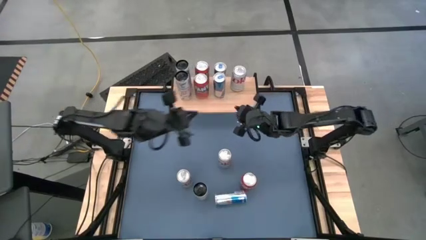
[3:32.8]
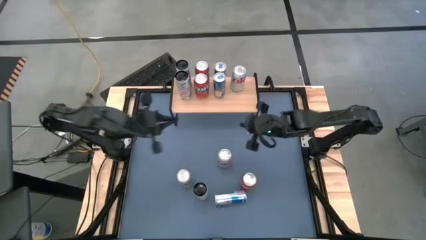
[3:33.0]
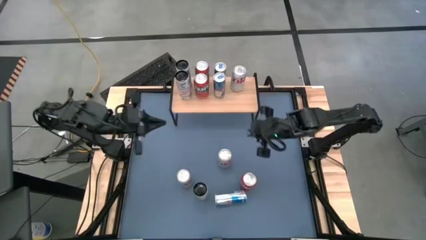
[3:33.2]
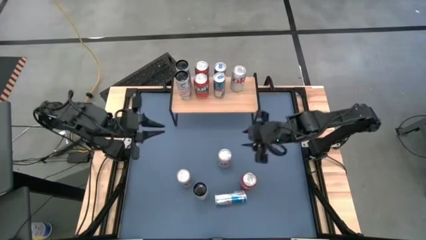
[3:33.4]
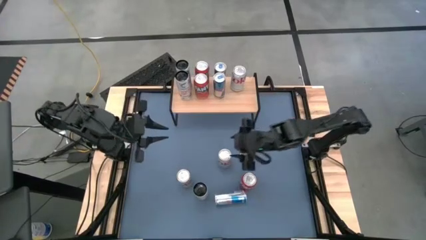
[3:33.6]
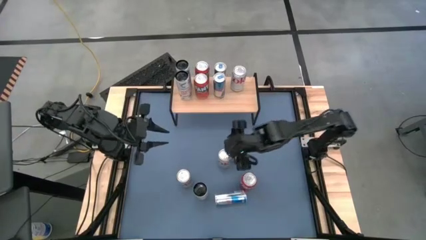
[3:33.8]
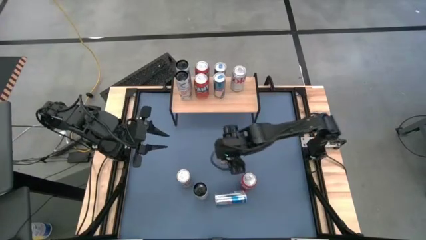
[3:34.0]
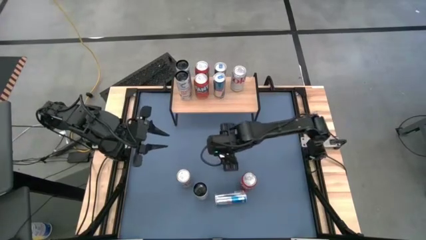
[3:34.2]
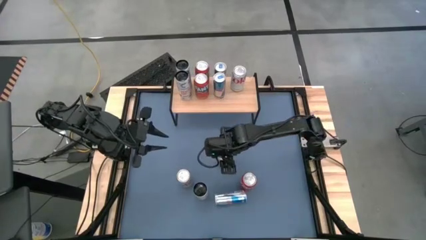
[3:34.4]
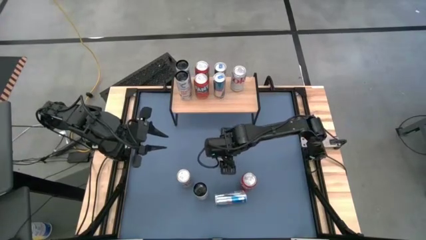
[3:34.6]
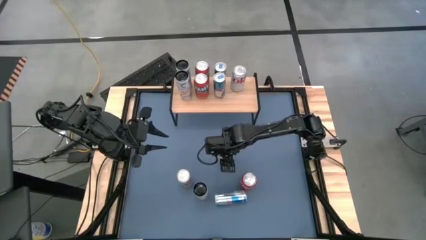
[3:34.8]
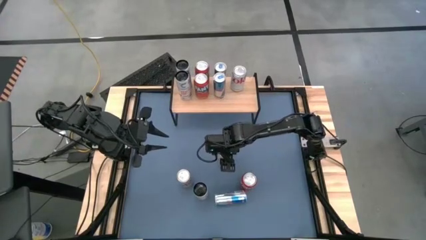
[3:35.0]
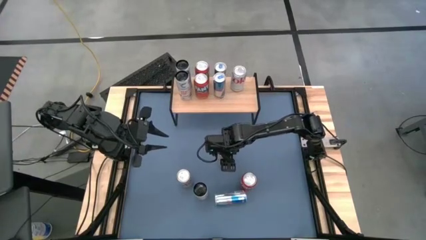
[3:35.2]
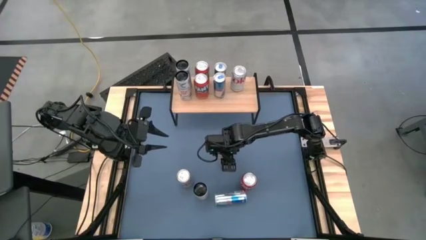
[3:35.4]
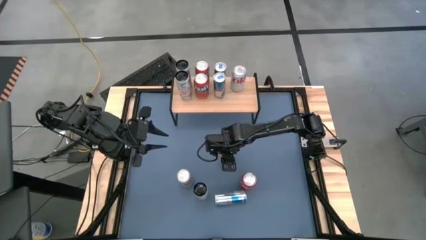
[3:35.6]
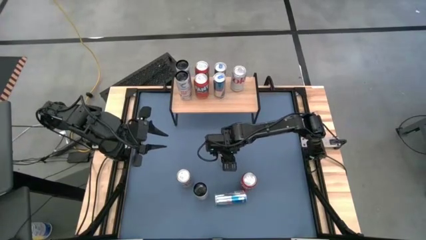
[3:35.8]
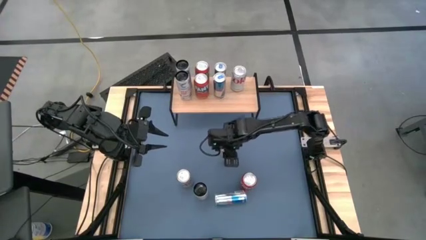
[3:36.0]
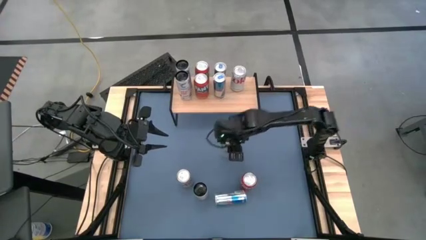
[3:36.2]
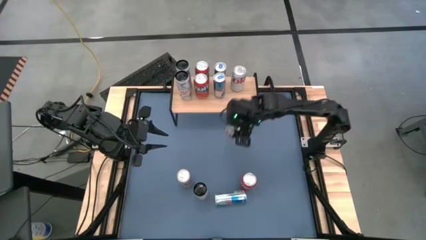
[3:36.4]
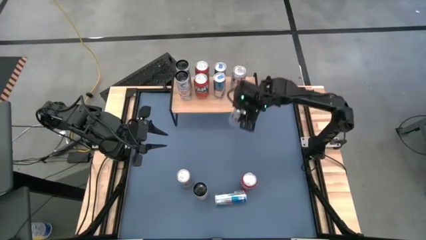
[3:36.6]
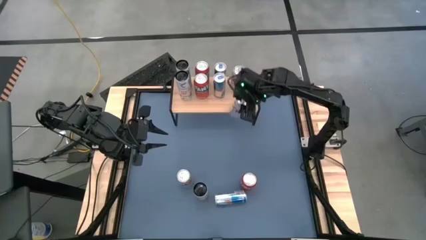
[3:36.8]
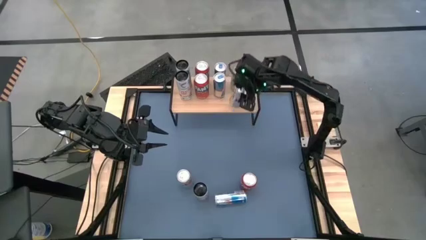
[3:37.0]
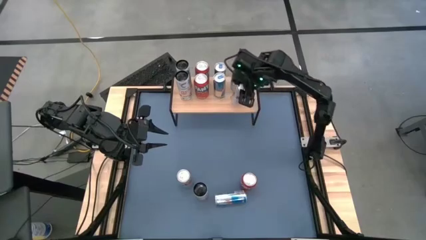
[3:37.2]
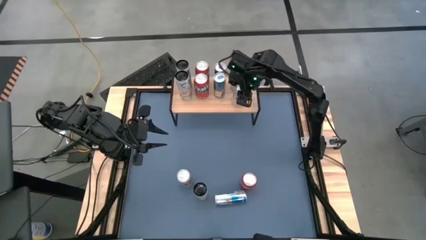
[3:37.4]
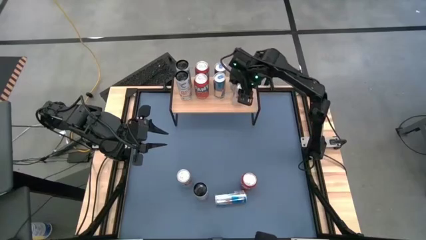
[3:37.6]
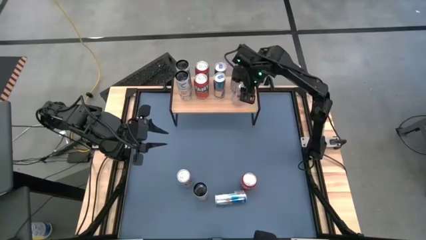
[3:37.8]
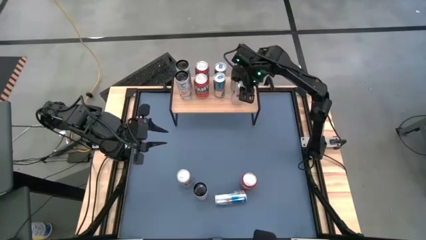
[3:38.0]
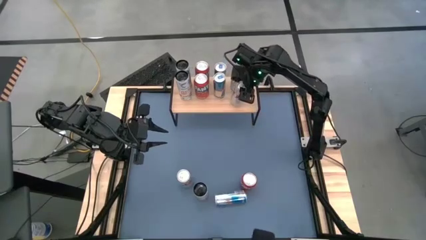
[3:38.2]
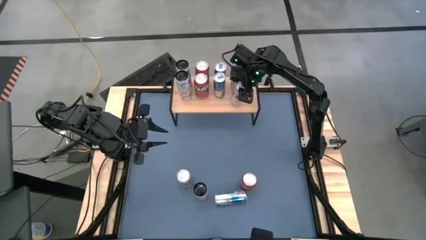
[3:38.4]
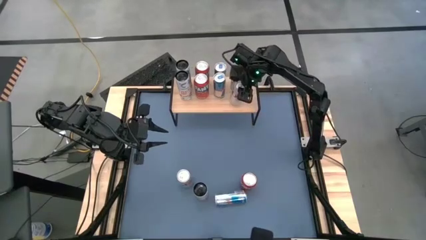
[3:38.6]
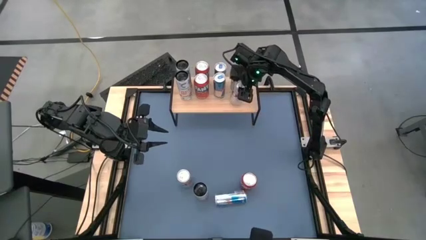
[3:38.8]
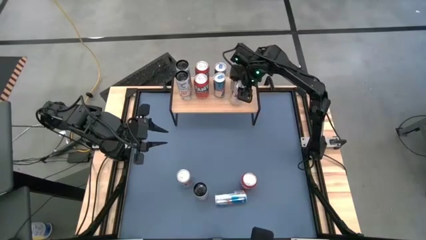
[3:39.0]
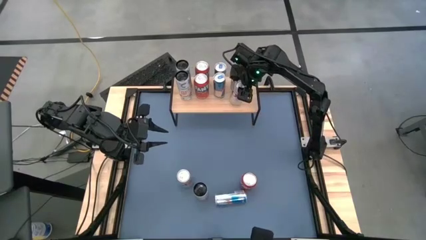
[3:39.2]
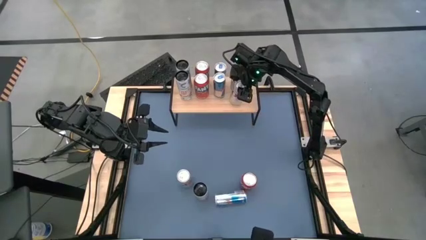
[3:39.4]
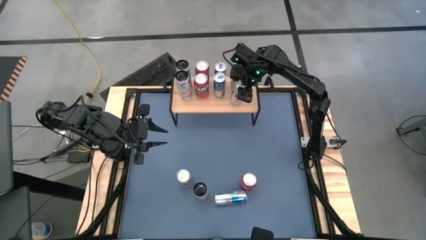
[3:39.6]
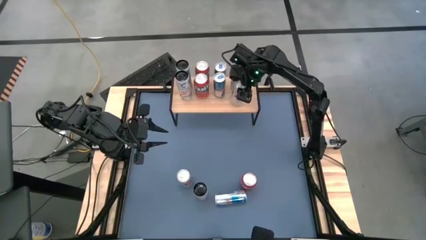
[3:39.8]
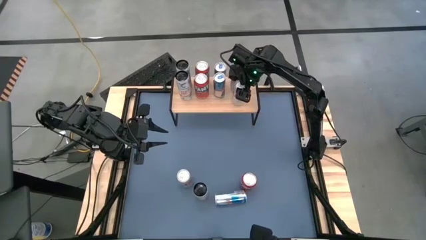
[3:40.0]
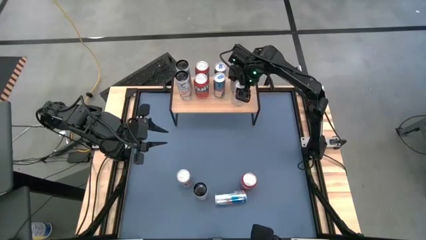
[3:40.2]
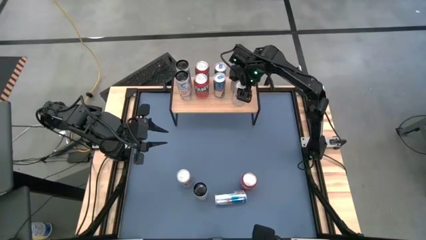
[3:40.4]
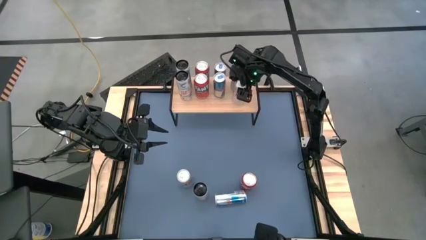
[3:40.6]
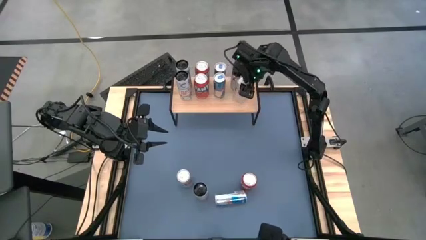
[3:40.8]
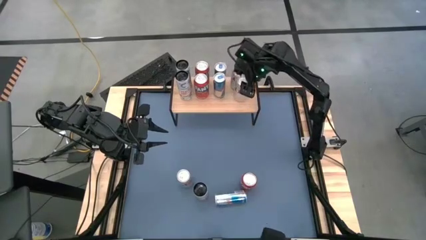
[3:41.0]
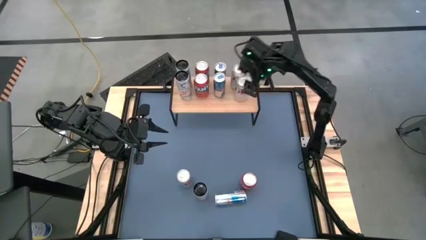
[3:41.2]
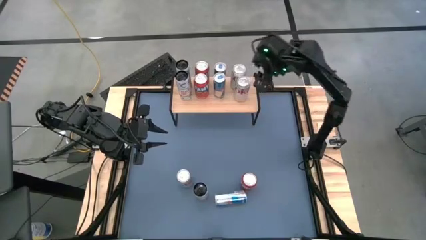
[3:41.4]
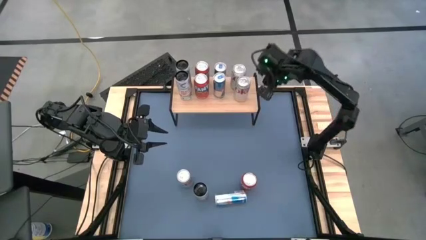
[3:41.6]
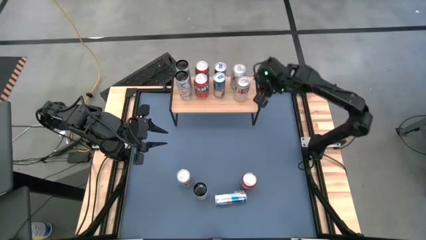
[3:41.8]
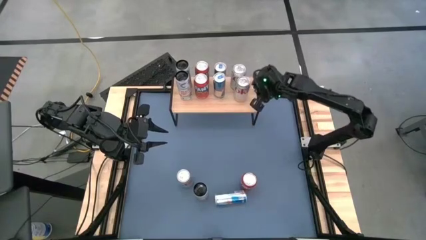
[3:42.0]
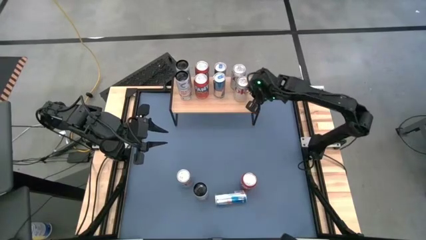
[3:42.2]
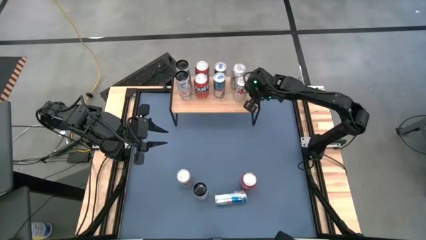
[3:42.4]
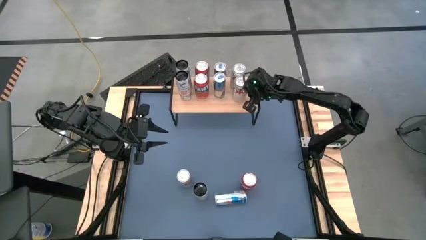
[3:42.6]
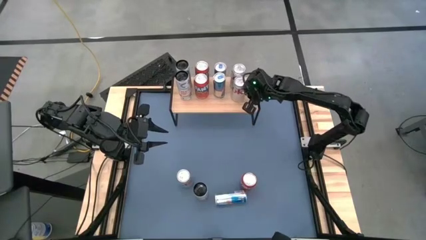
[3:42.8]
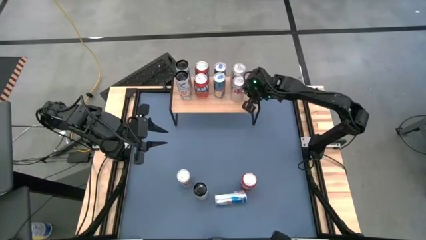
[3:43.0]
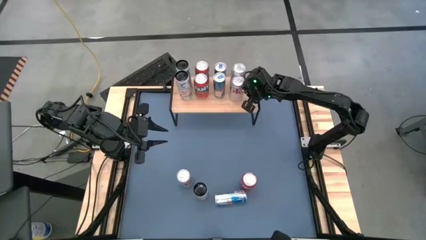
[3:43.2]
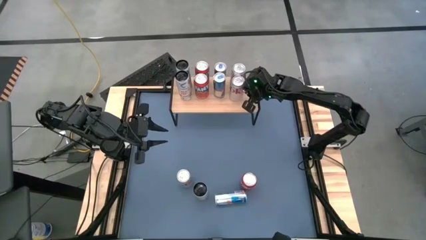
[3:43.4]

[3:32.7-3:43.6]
Task: Place canned beverage on shelf
Put the center white soda can on the shelf

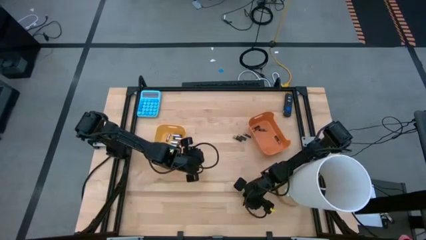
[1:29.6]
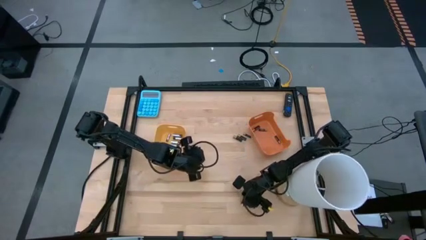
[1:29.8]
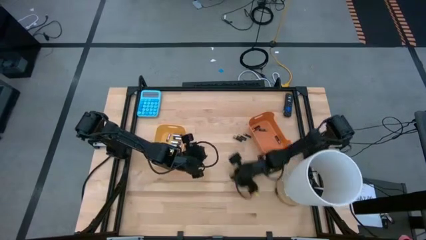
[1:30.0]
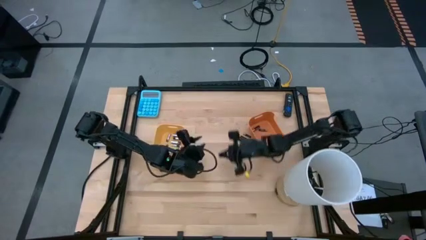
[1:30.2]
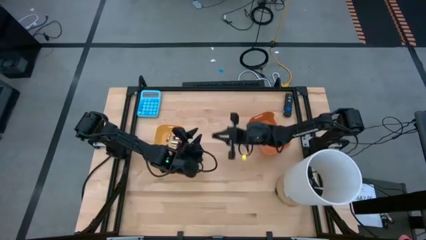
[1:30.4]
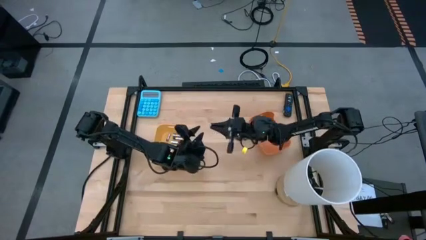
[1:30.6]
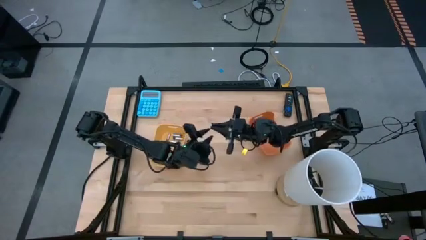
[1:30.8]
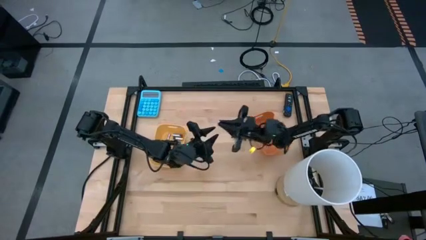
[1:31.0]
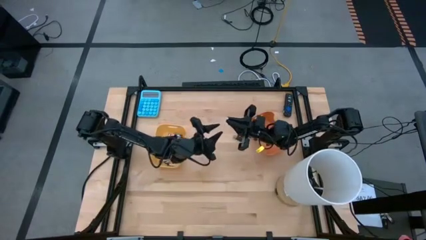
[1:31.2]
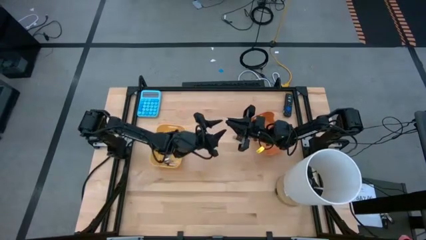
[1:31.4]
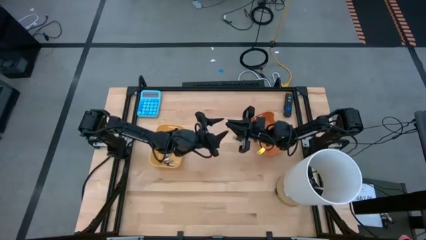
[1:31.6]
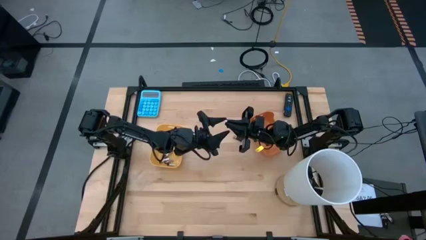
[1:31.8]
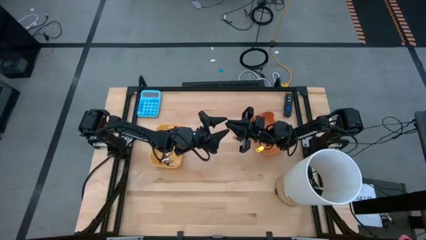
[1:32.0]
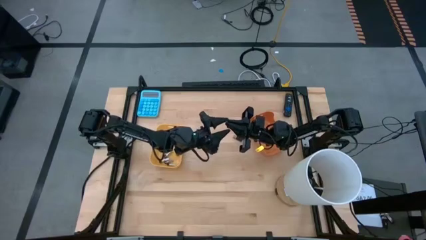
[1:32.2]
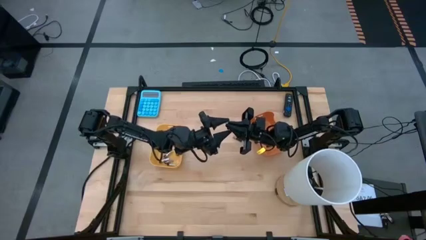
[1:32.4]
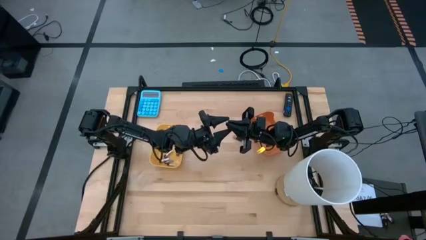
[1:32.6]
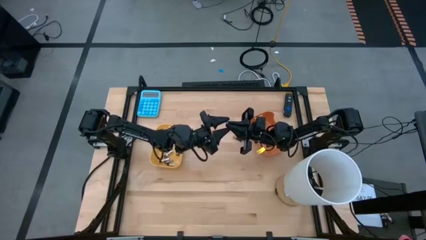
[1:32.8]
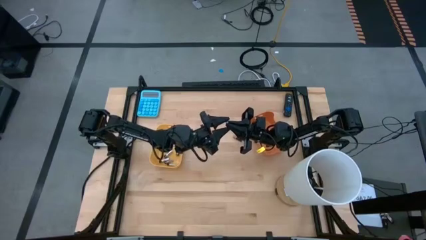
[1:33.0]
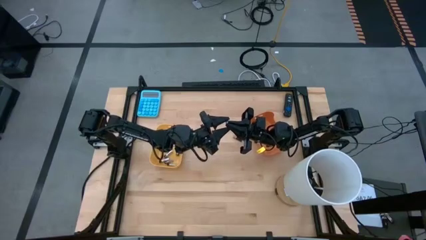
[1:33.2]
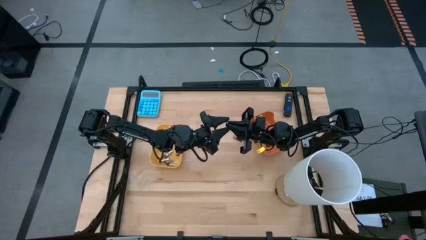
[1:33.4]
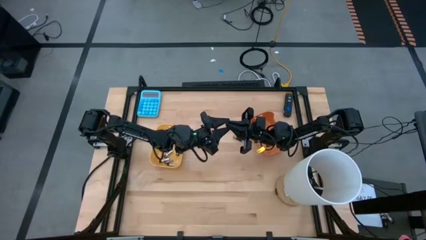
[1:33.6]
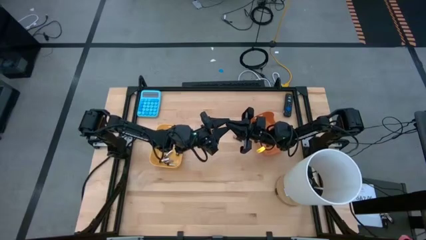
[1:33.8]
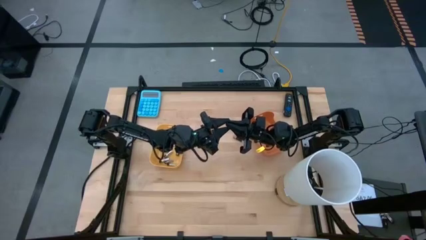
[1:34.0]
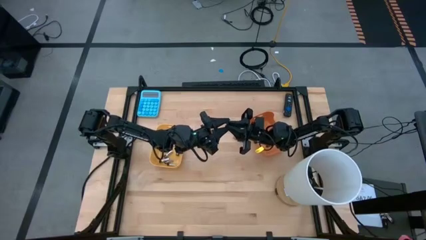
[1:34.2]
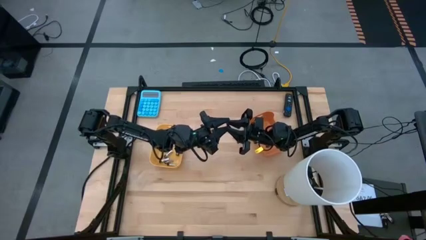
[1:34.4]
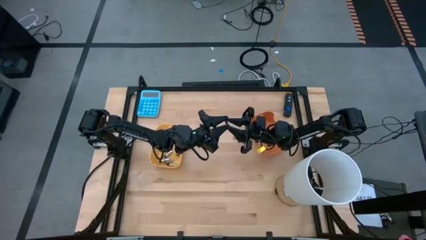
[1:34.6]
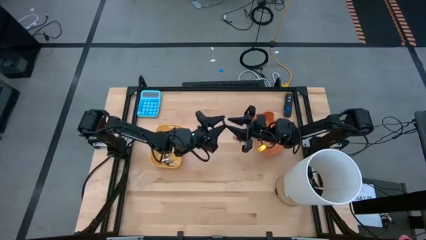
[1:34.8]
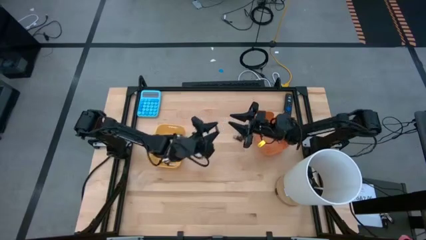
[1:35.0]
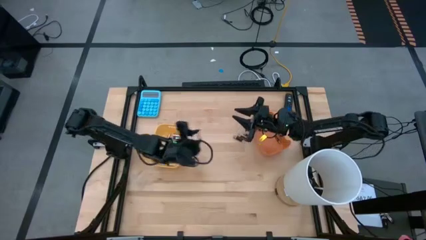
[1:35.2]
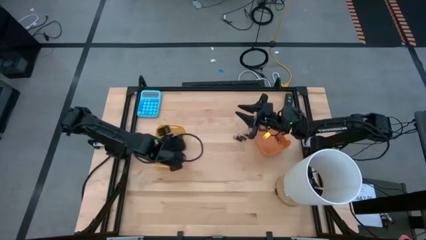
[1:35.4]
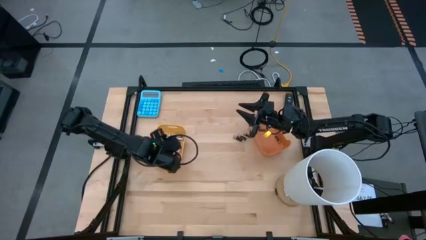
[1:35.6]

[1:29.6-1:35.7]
Task: Sort batteries
Put the silver battery into the yellow bin
